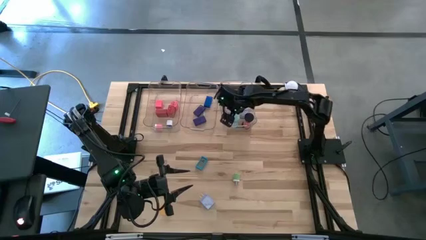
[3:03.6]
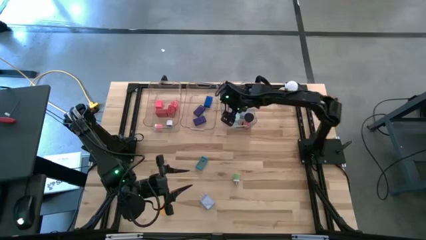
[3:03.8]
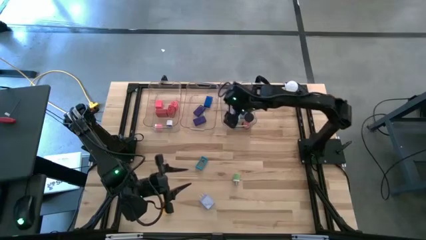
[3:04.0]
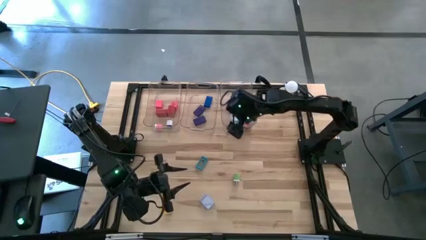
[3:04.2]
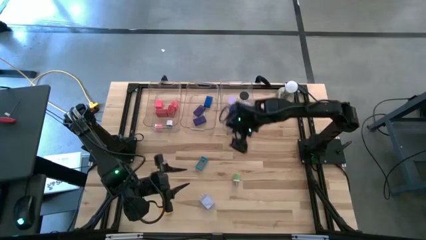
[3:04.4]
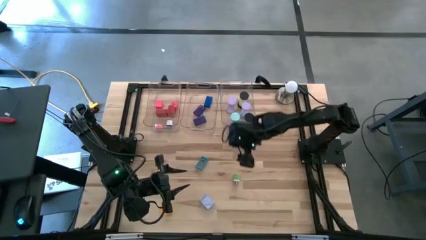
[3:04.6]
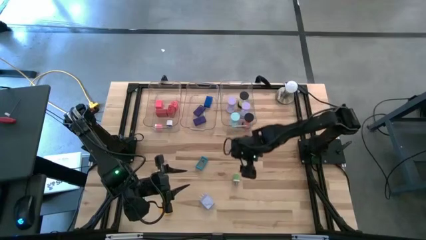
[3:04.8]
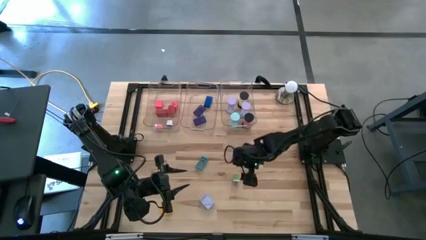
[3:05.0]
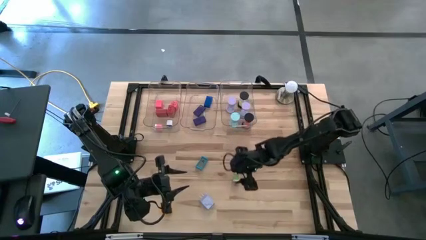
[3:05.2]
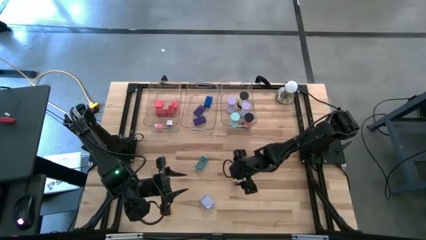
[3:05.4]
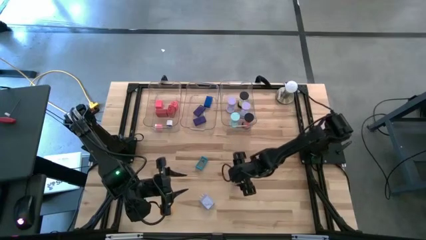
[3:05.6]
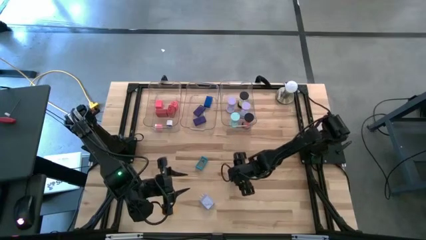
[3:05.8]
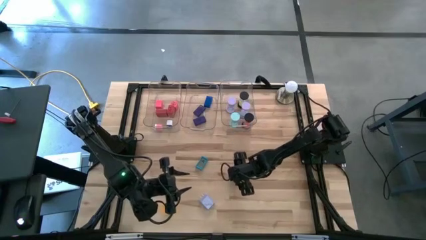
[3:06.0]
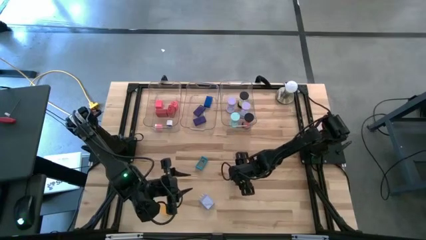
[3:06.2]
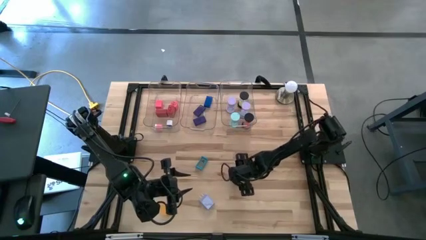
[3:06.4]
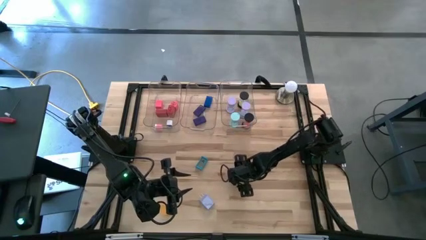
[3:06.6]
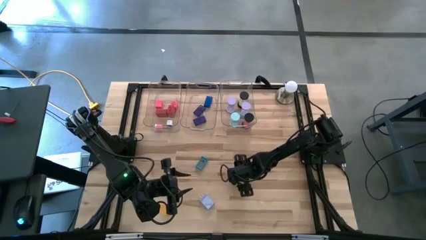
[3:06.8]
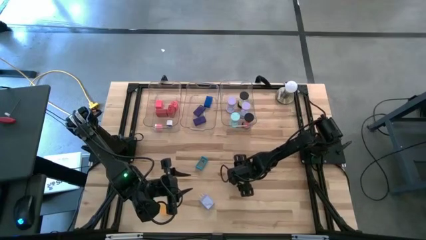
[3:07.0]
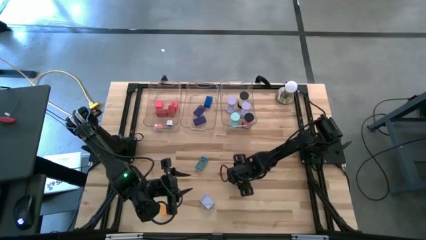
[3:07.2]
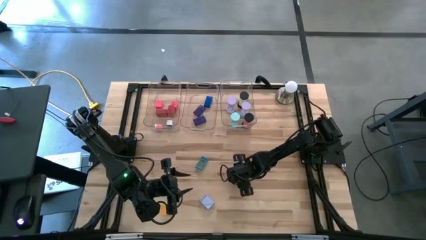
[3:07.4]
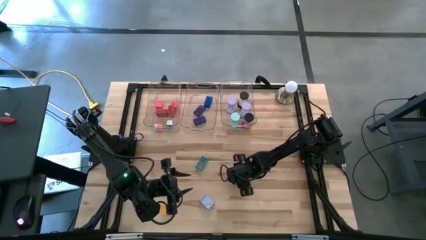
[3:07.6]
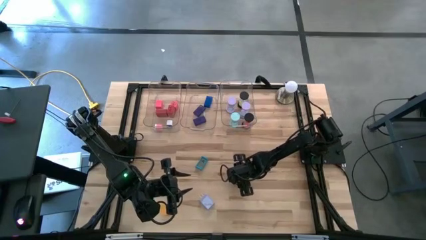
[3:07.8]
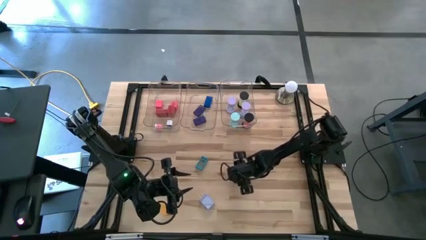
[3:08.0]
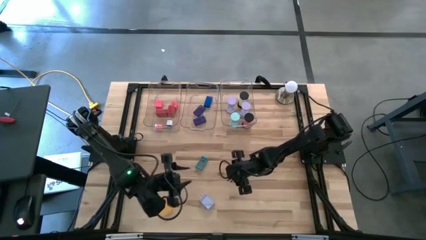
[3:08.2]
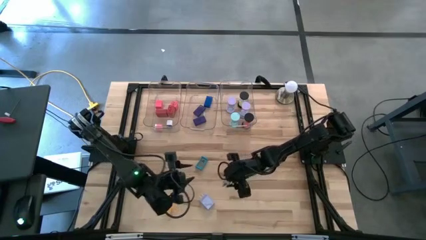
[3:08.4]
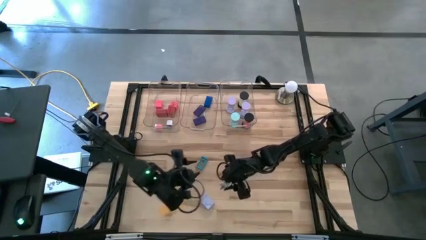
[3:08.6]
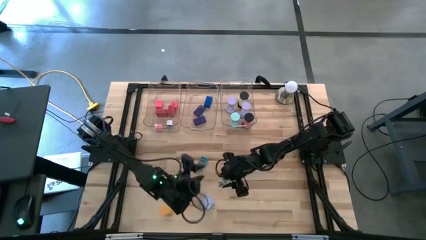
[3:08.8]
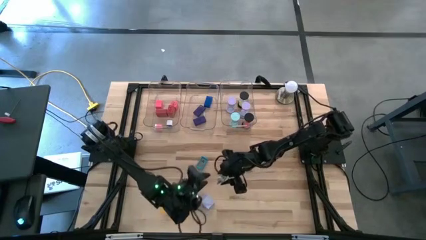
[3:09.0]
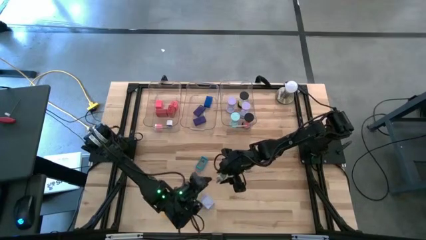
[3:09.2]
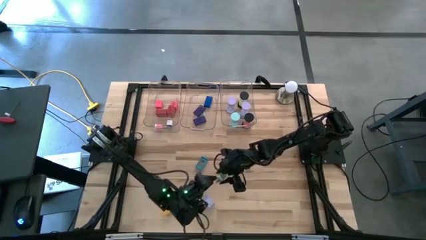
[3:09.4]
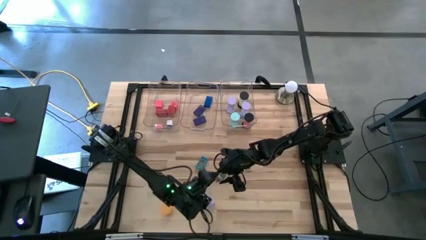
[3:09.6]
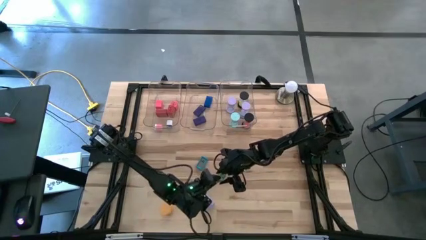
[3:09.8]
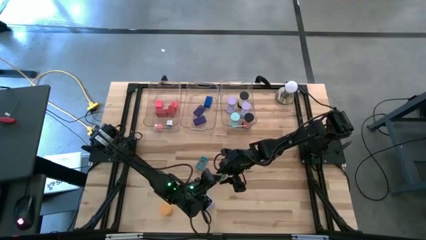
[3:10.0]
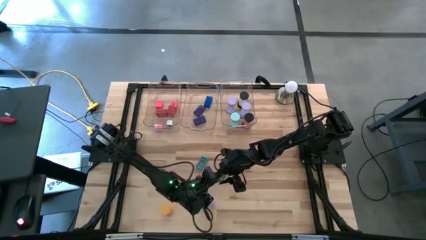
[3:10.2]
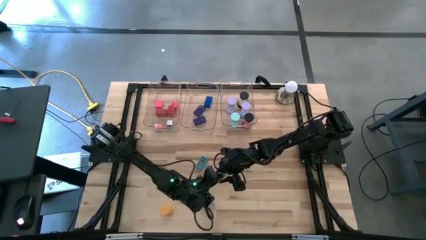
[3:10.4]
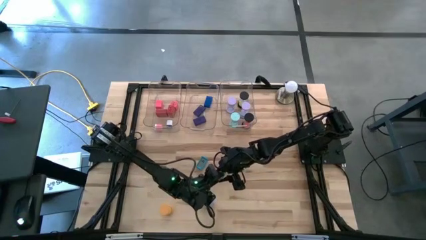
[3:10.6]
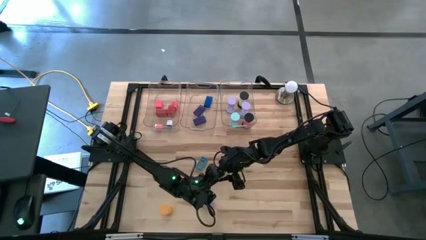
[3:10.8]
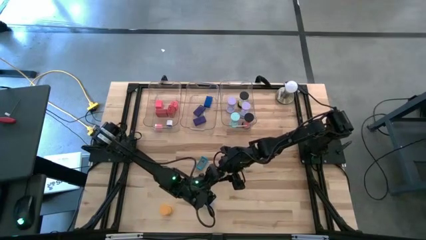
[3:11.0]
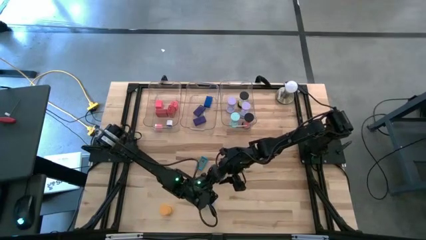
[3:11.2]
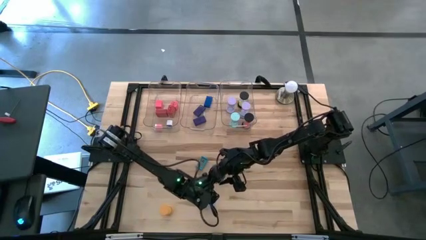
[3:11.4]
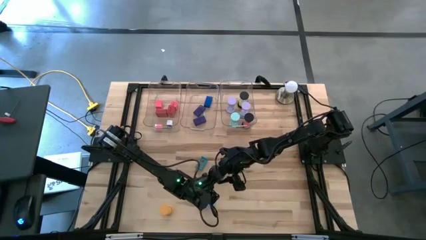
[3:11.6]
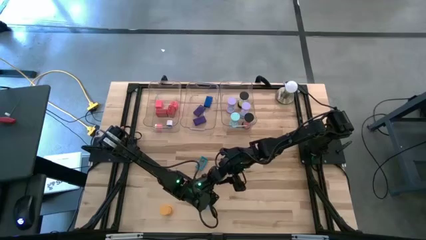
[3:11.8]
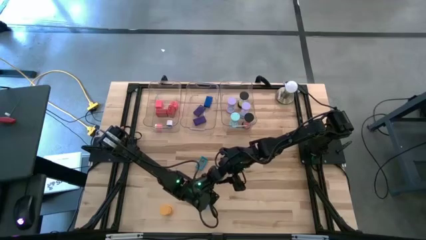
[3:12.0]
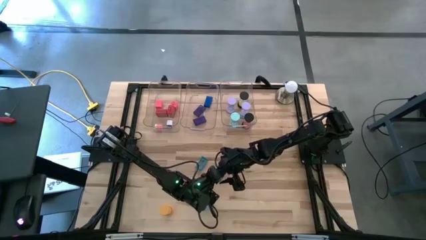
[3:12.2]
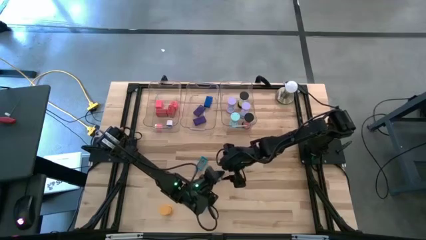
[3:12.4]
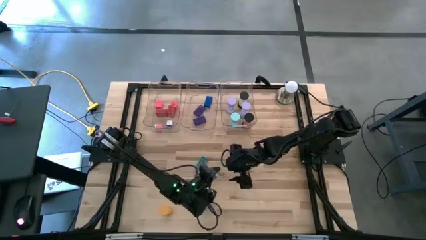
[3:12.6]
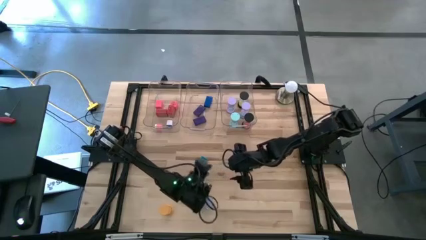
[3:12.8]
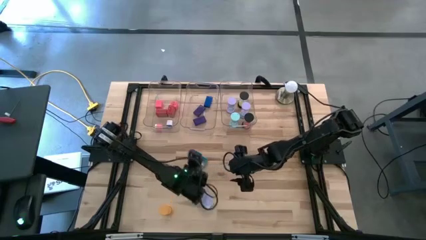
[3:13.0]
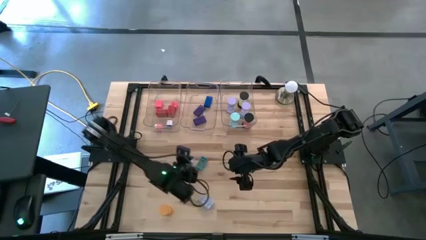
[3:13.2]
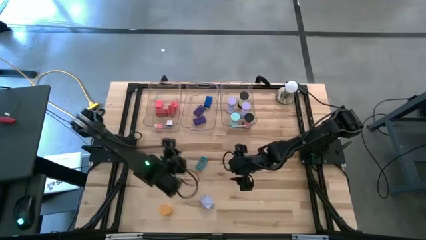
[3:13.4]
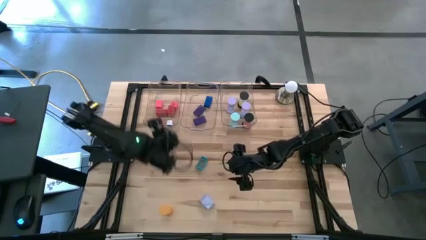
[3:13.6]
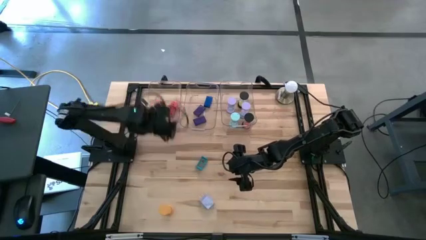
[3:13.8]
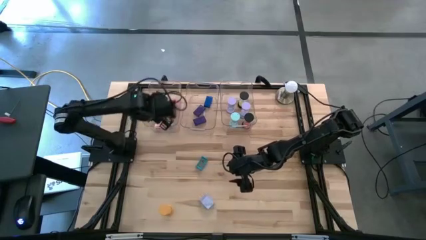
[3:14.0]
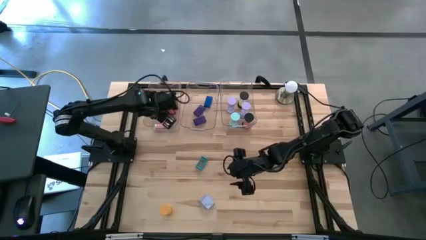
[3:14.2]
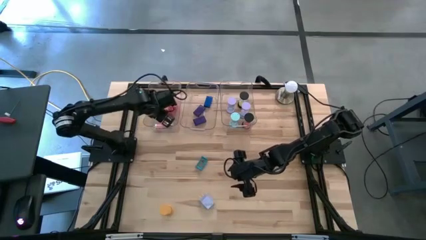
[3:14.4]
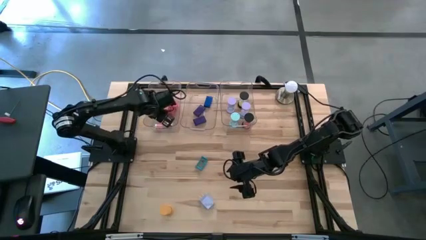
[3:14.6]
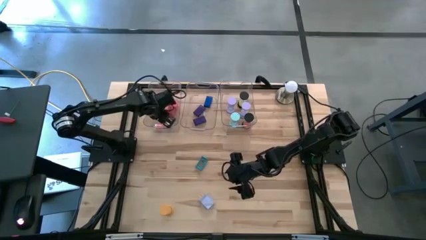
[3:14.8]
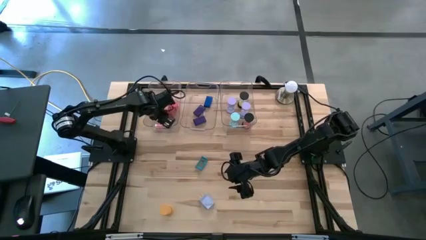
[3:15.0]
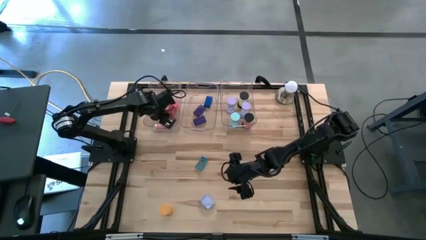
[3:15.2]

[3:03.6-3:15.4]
Task: Pick & Place Office items
Put the green charger adapter into the left transparent bin

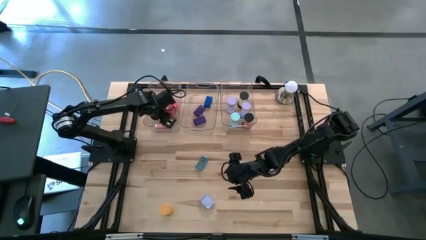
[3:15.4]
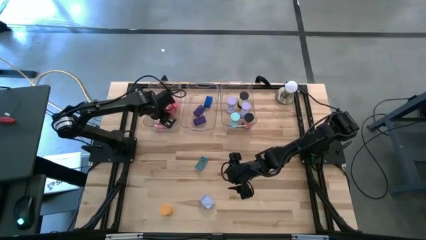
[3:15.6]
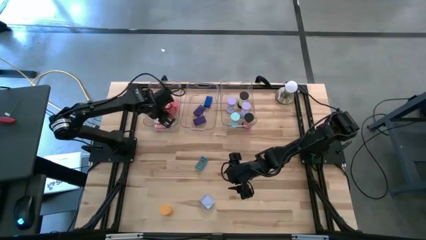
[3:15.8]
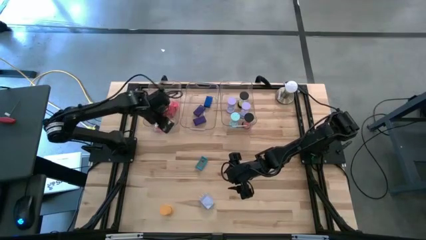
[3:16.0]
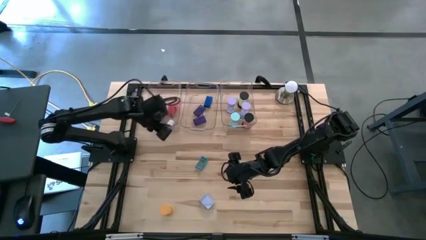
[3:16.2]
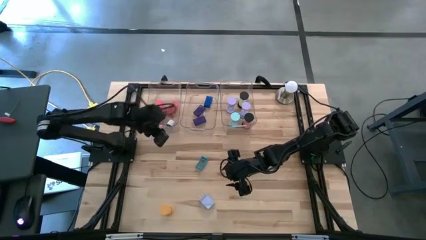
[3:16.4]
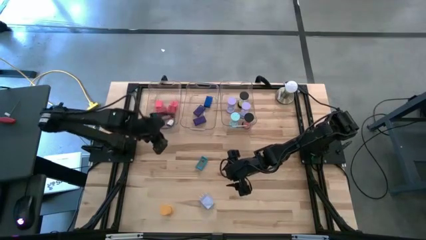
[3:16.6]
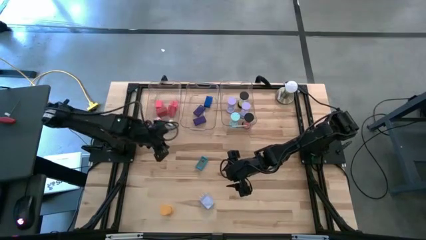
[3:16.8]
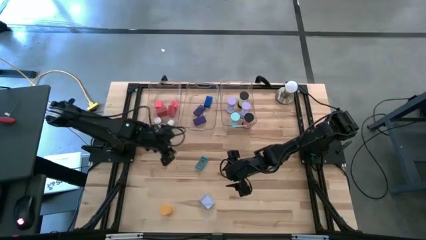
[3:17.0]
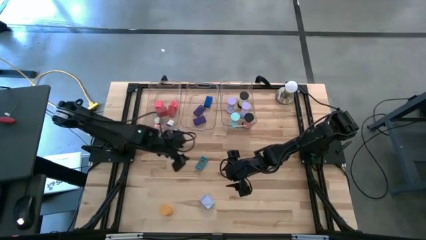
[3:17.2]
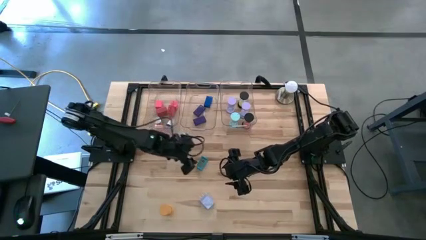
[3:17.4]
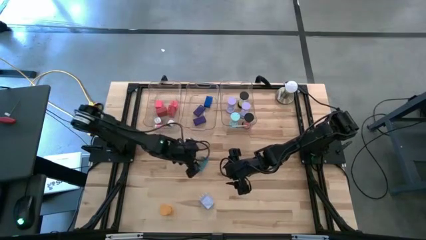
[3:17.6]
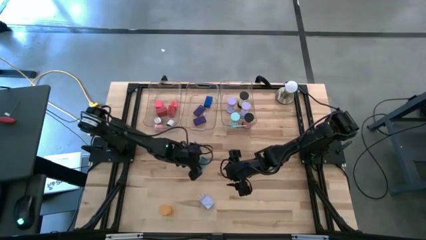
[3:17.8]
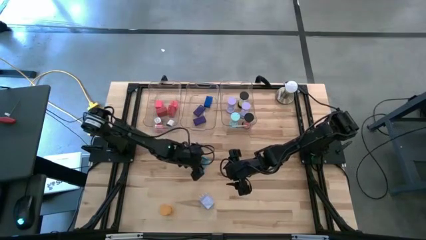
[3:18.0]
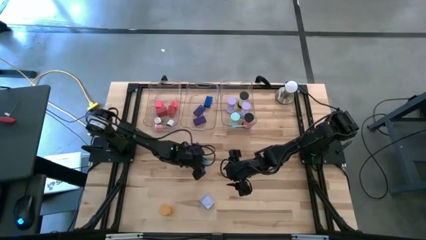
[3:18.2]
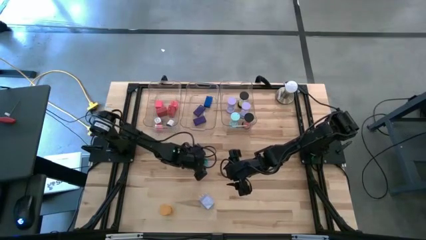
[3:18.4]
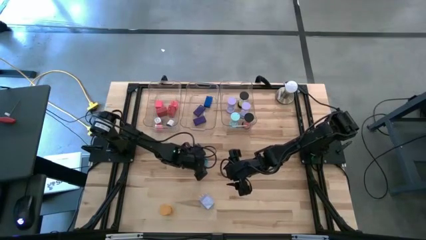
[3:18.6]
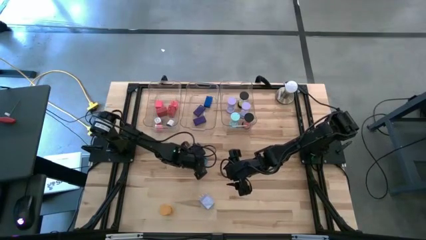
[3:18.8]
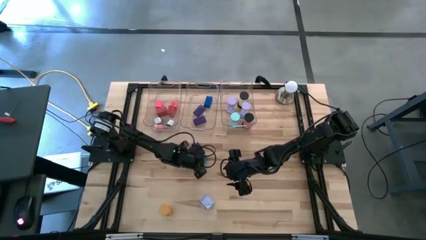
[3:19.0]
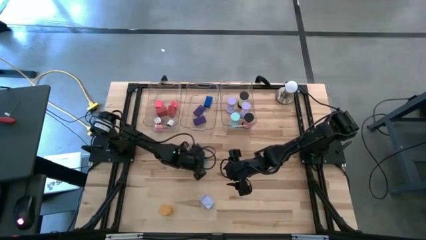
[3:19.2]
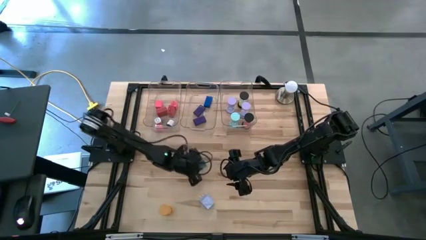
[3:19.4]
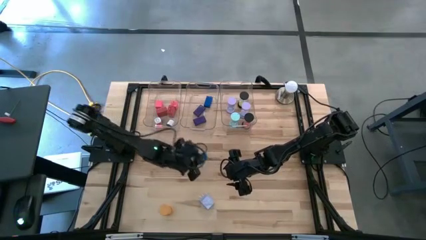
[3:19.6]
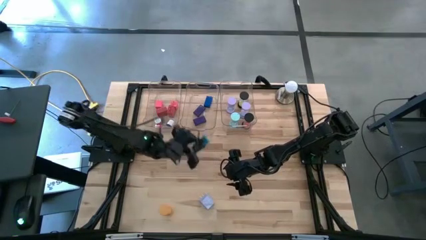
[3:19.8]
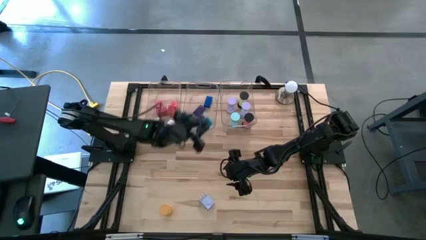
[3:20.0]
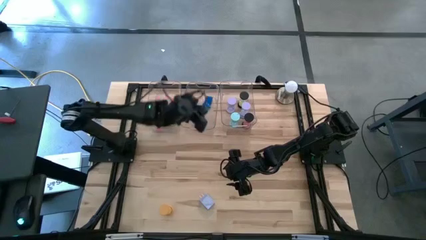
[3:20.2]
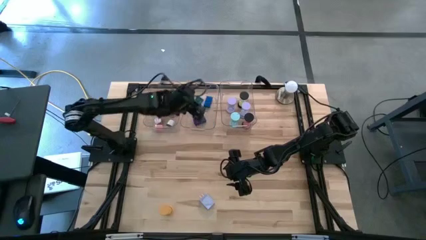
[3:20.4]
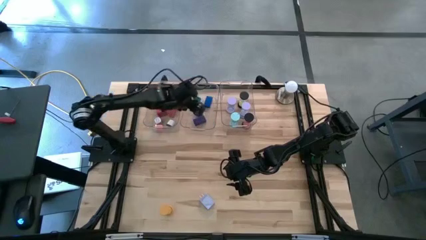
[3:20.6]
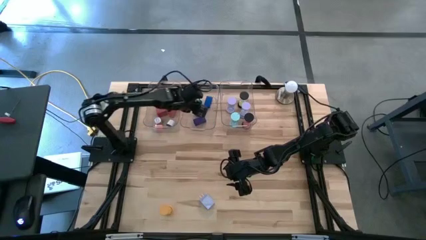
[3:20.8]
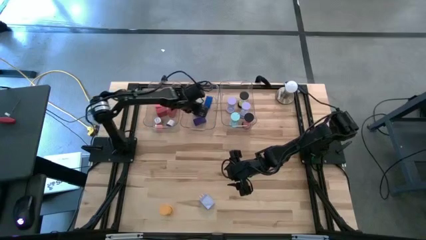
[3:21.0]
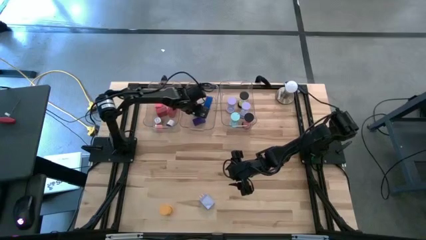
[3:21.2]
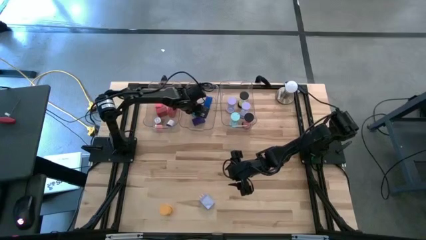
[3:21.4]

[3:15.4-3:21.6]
Put the light blue digital clock into the middle transparent bin
